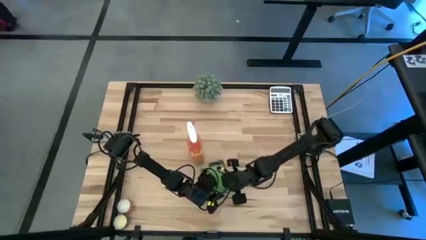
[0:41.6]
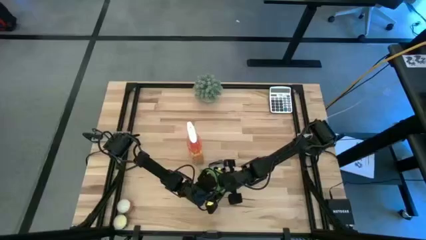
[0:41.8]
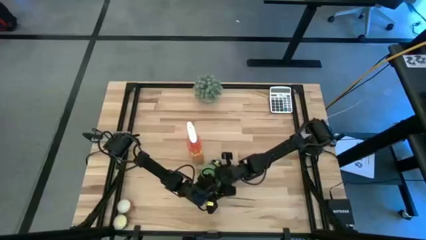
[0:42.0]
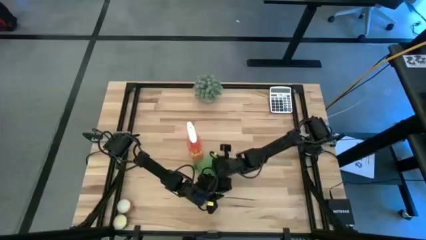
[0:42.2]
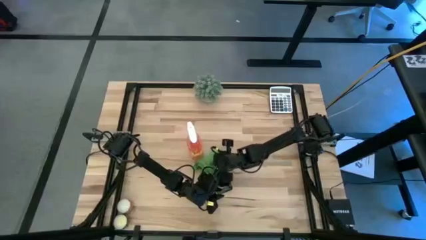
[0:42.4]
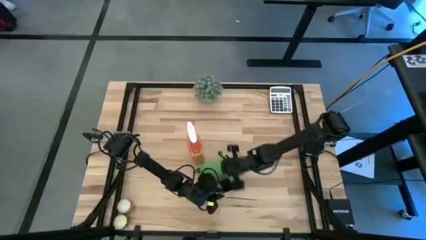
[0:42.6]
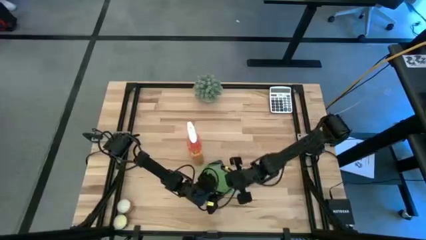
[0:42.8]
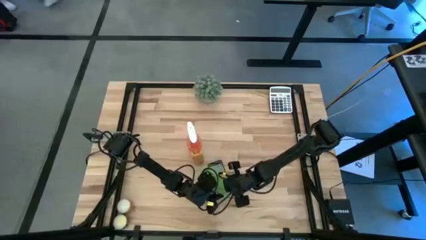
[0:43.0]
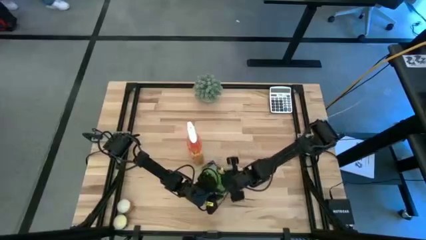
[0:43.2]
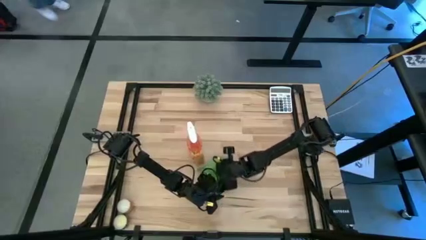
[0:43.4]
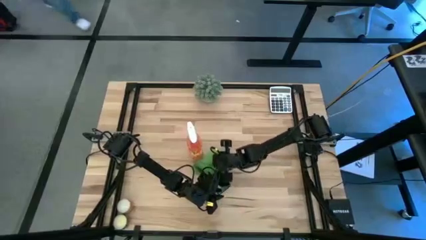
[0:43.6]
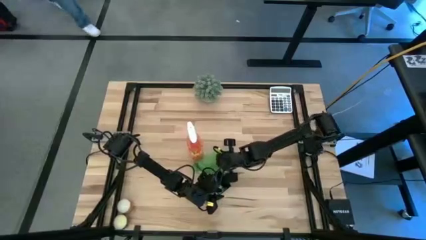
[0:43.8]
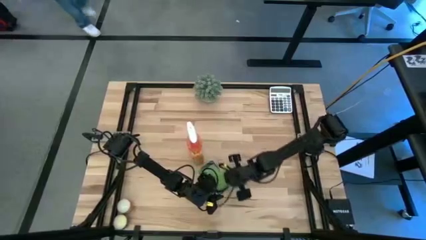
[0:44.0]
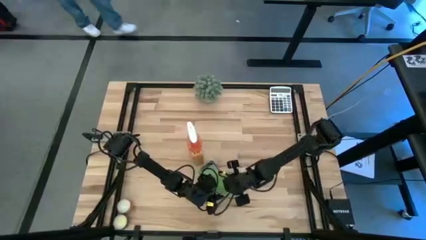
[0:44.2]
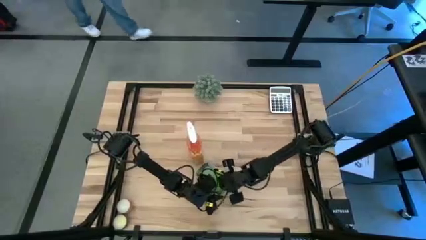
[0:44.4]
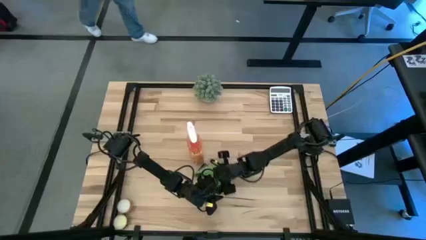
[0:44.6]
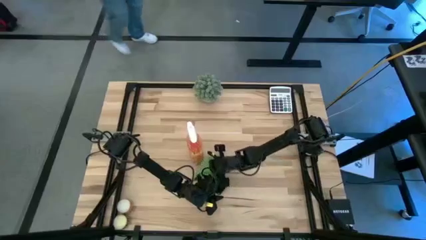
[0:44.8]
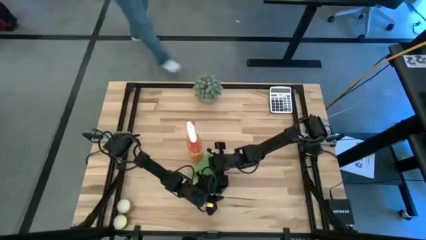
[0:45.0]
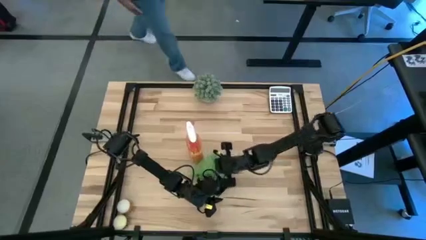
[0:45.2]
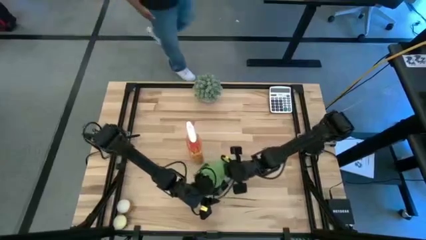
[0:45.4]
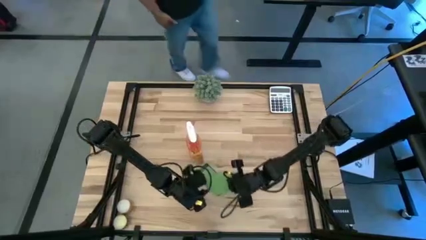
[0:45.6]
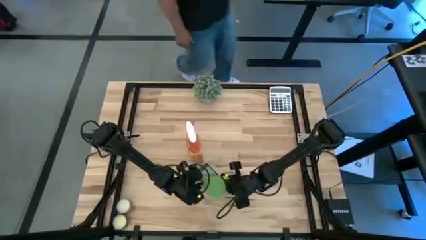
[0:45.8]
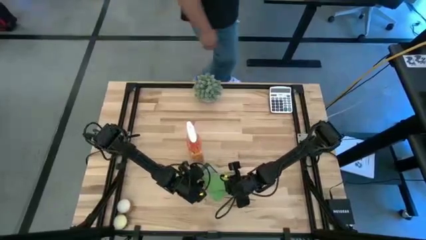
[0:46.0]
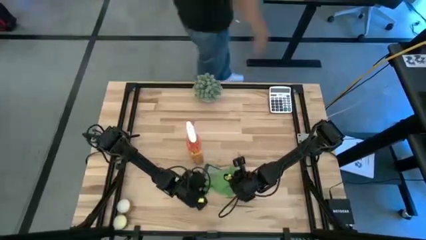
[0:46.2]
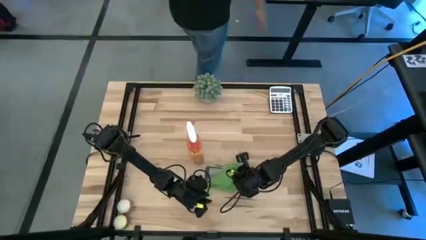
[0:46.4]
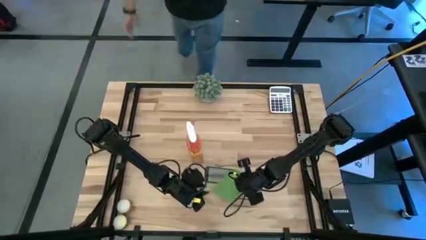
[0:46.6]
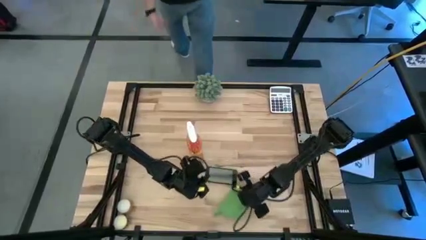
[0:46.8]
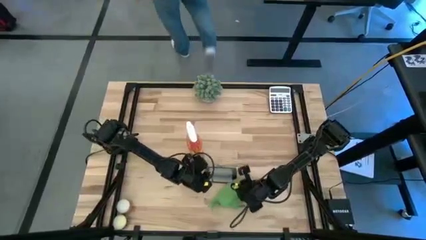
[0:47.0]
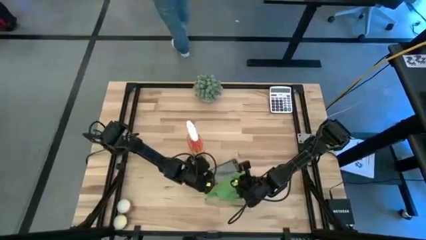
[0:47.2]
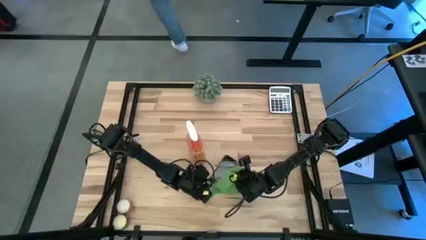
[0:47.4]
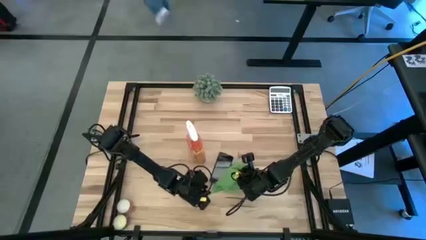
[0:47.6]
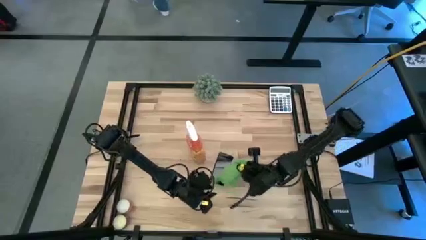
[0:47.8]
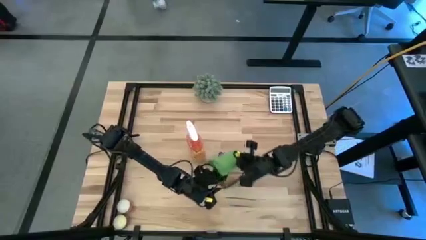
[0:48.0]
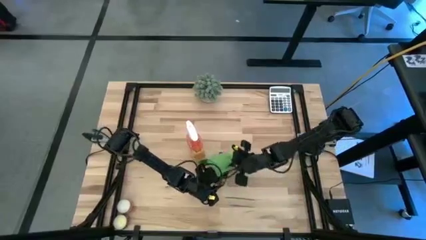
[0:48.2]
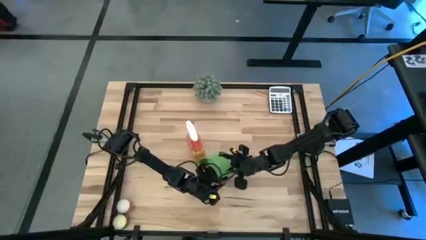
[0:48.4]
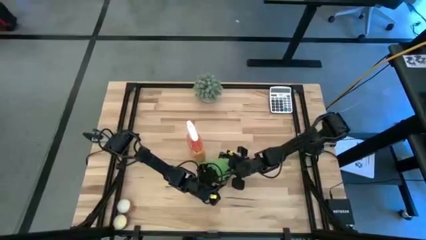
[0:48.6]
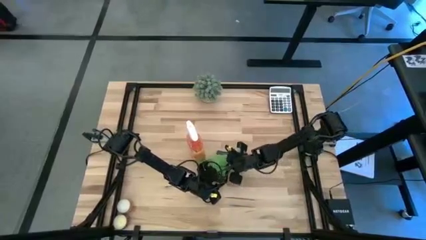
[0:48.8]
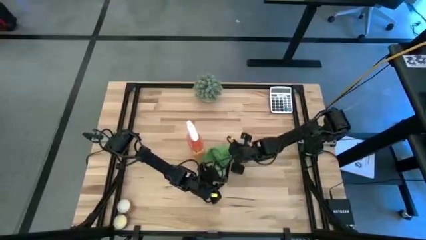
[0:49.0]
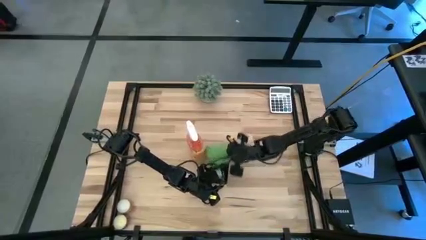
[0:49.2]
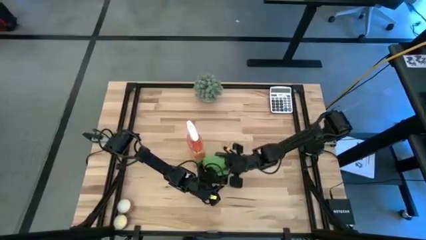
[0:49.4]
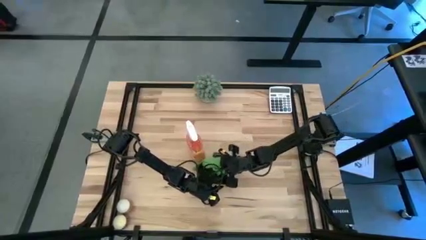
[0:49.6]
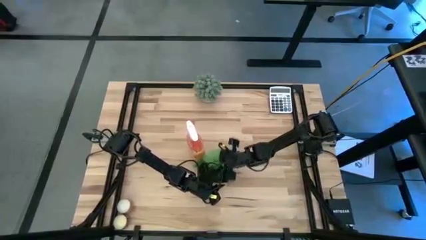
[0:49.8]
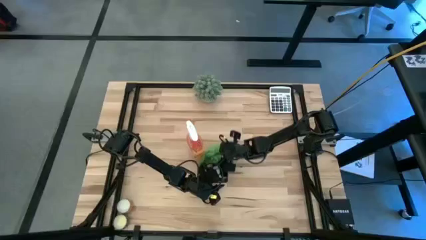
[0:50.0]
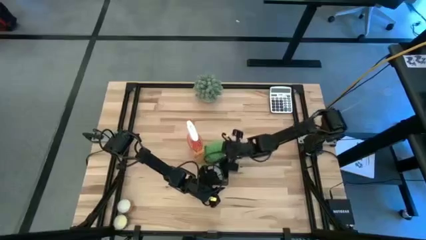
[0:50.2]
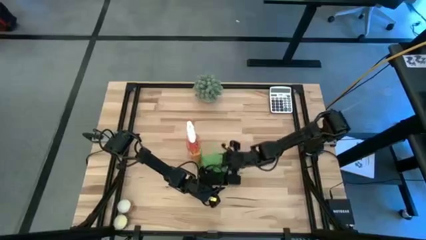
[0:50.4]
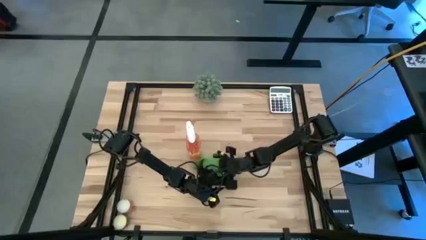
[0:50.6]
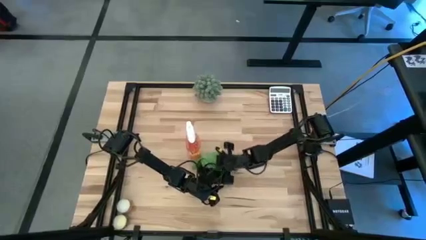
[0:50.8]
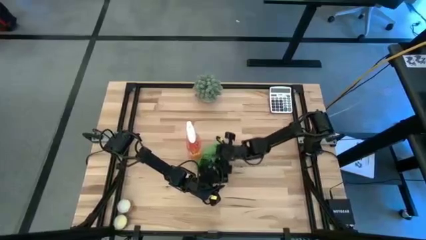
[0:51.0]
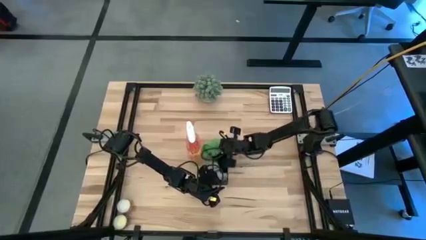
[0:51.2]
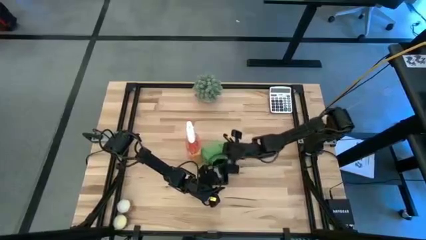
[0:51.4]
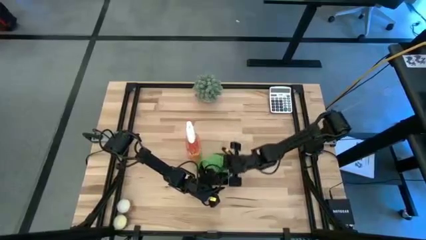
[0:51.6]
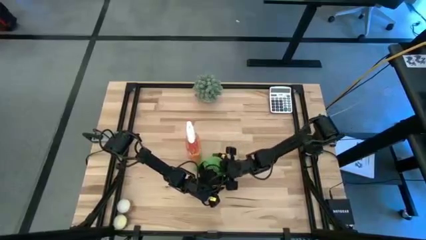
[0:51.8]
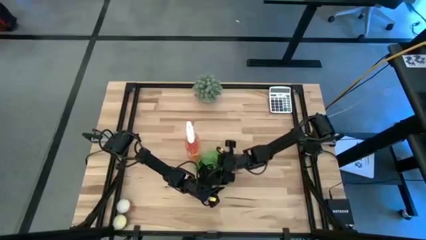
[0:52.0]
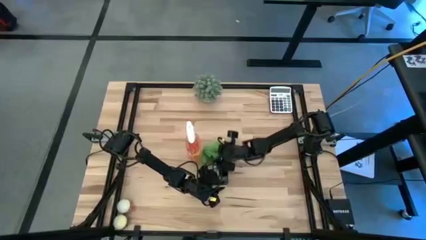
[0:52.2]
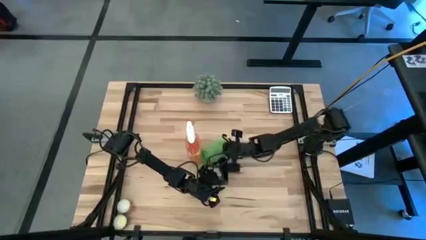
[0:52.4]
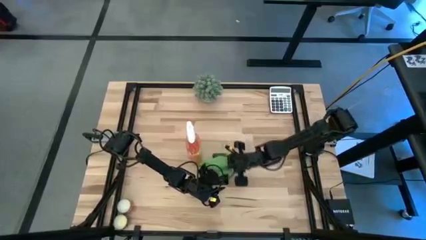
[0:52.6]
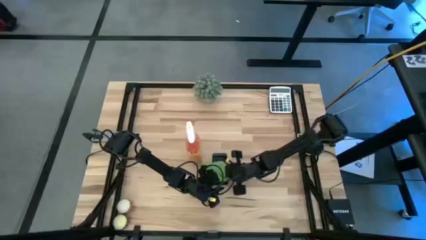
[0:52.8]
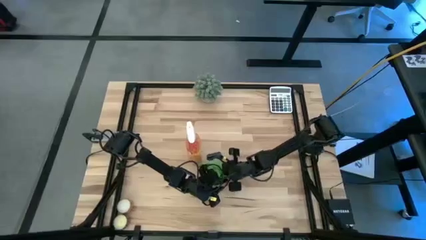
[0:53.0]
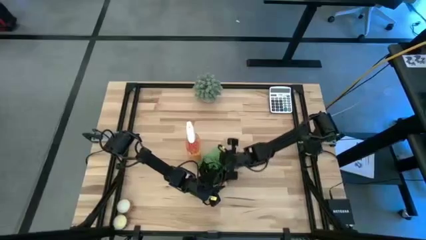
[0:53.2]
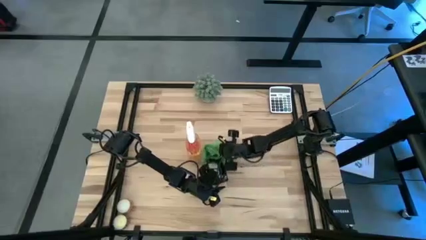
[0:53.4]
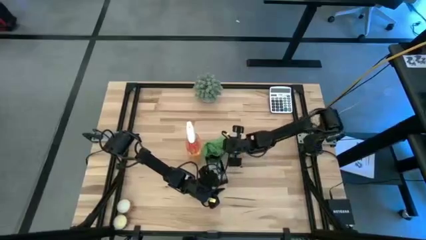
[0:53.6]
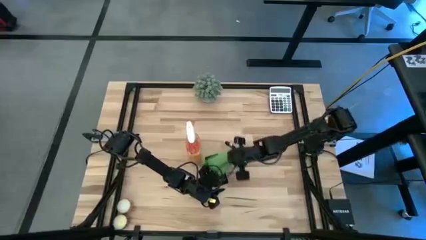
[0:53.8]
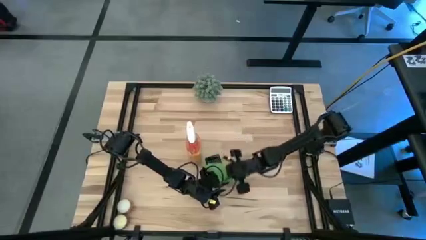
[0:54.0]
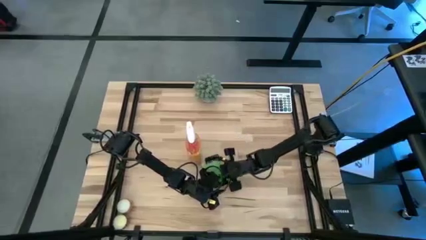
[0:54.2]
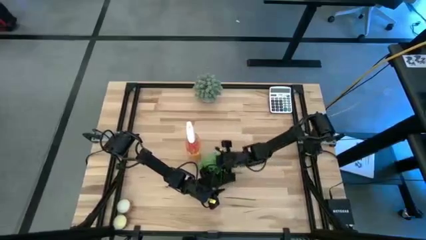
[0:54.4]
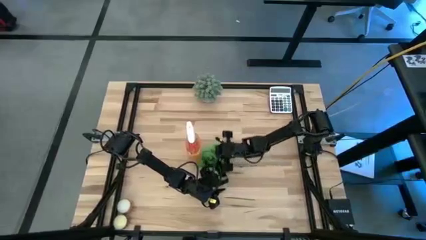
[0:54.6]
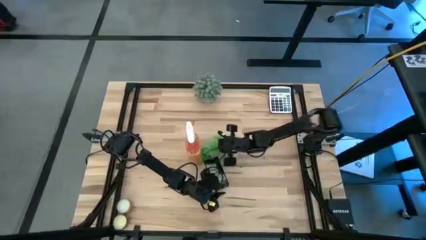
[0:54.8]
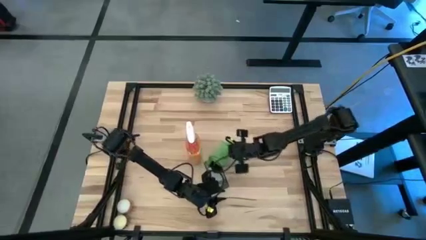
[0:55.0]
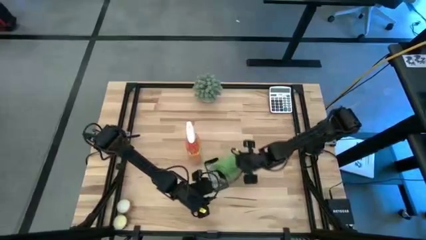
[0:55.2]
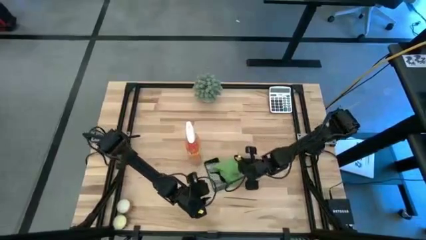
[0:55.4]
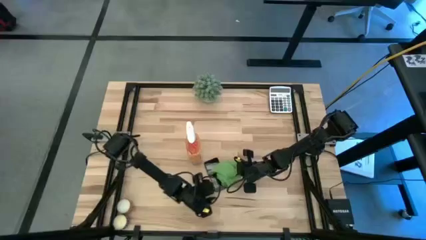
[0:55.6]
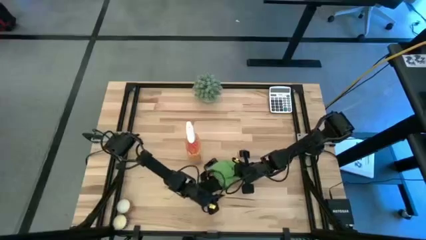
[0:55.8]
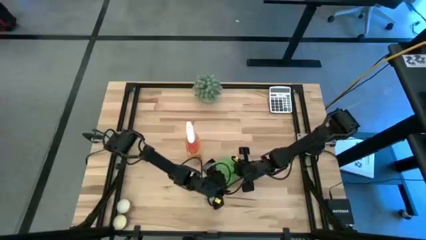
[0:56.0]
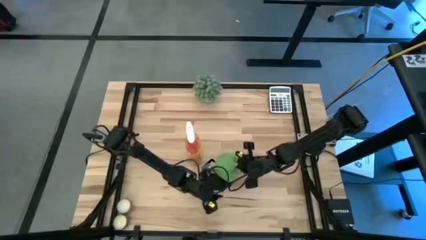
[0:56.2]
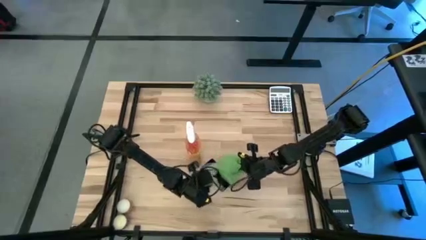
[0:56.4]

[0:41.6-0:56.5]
Task: Apply microfiber cloth
Wipe the front of the black cellphone using the green microfiber cloth
